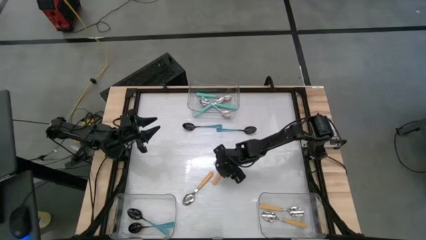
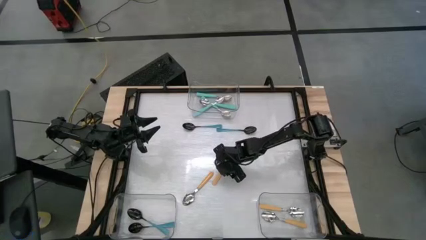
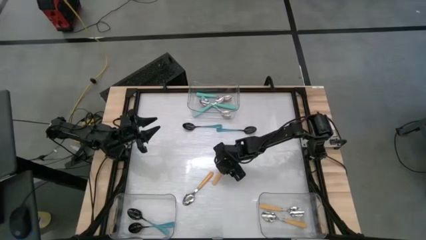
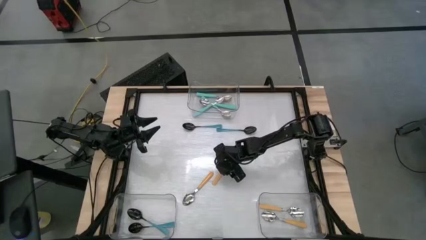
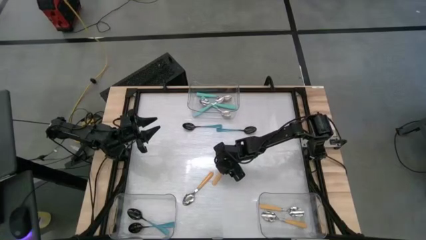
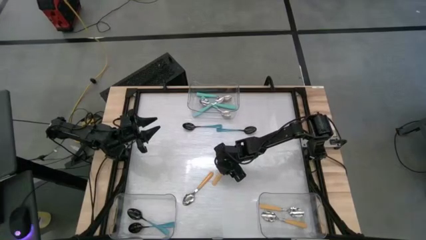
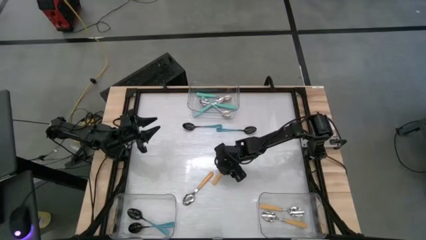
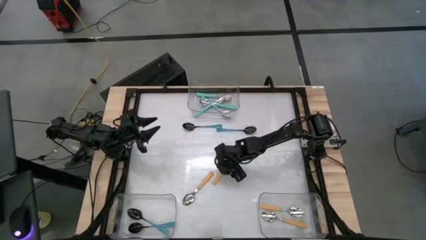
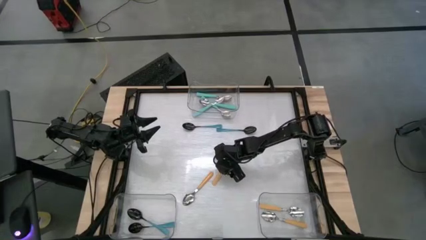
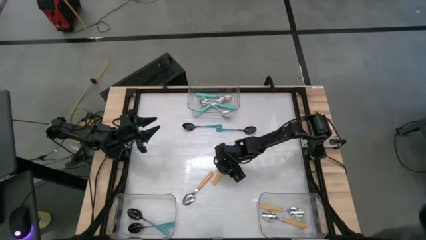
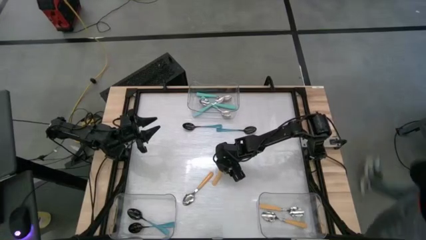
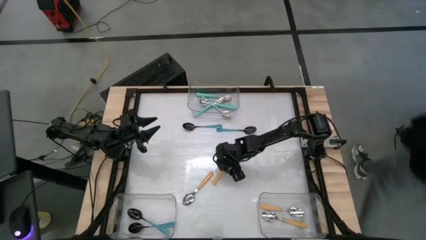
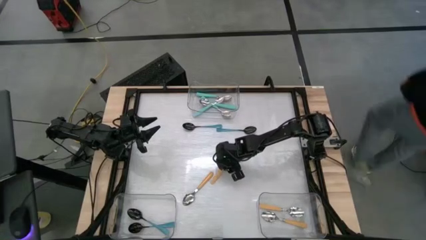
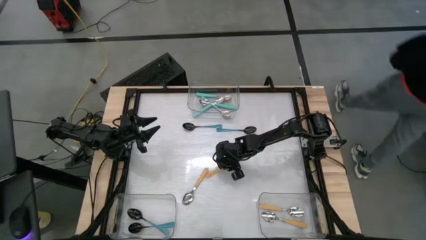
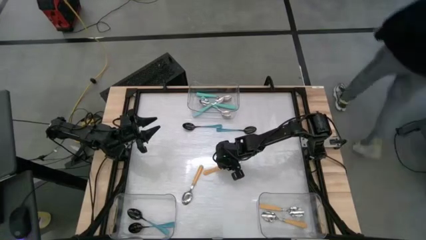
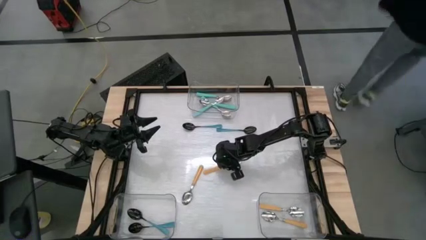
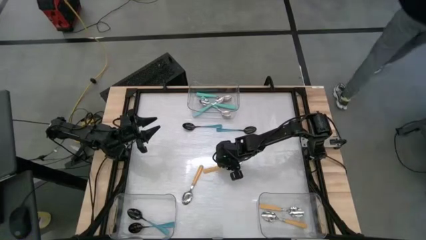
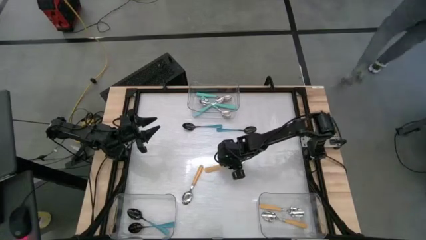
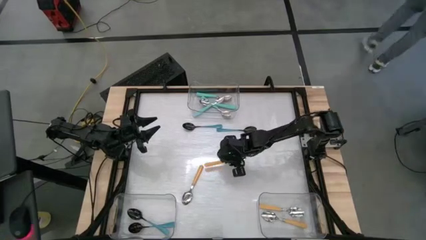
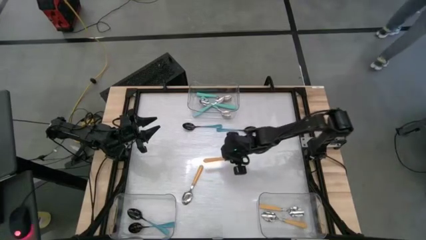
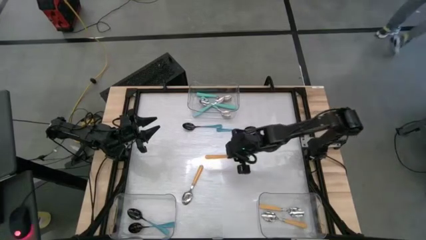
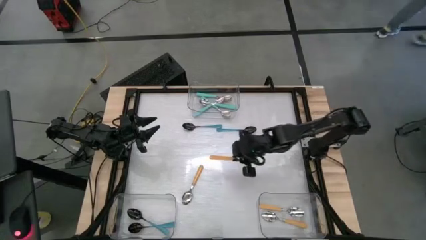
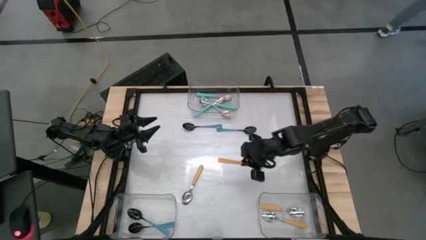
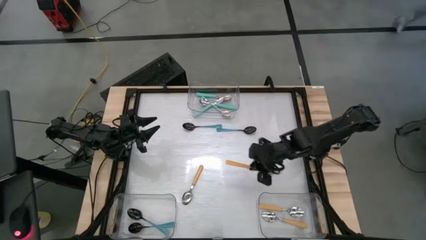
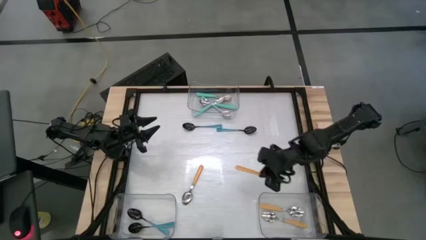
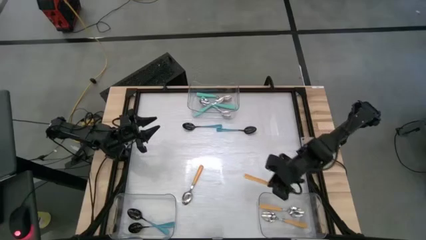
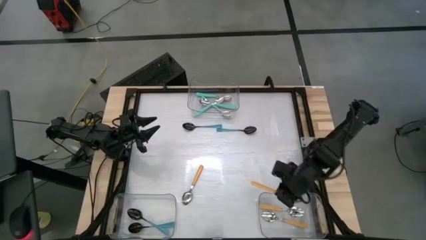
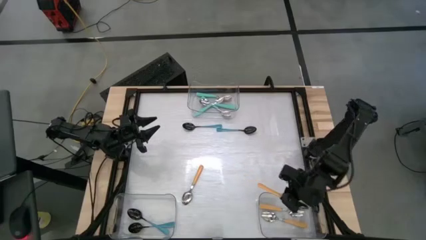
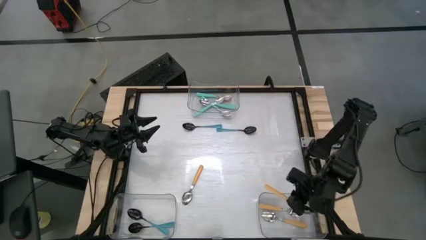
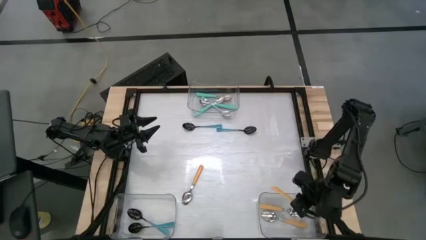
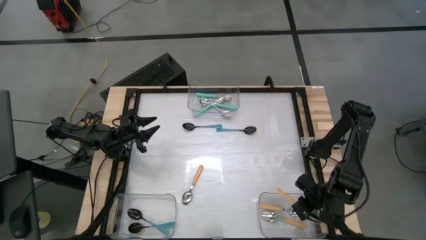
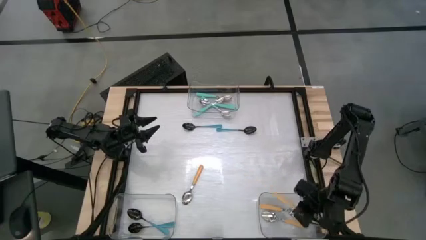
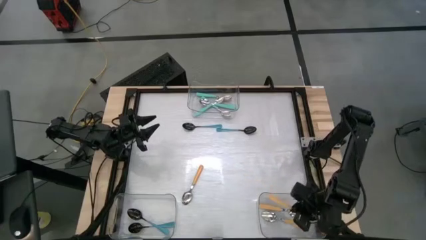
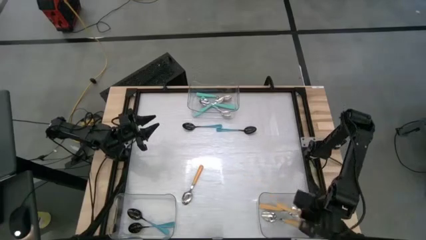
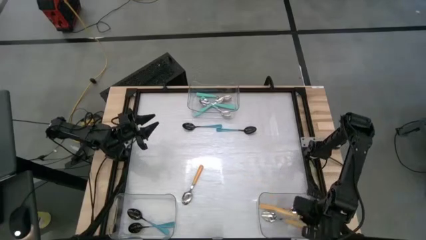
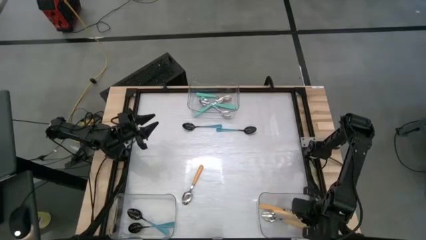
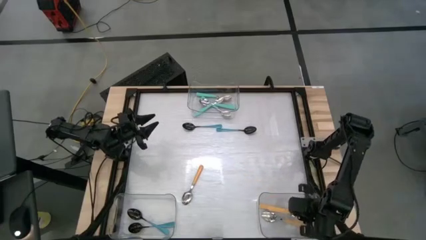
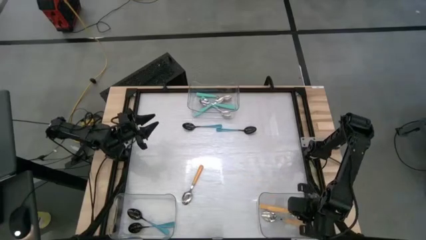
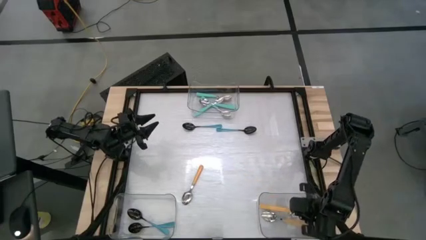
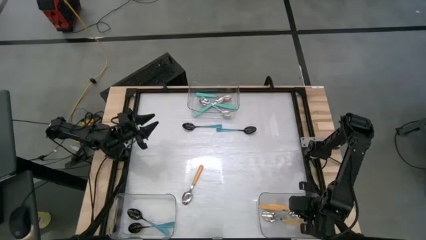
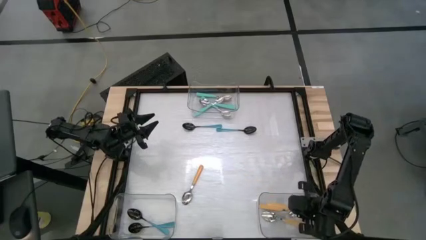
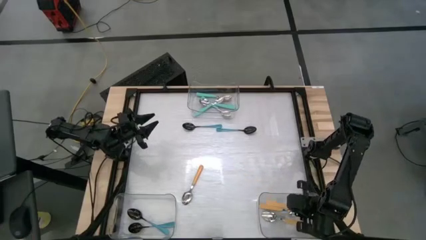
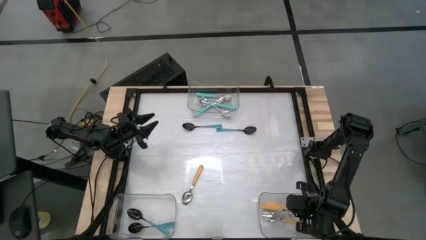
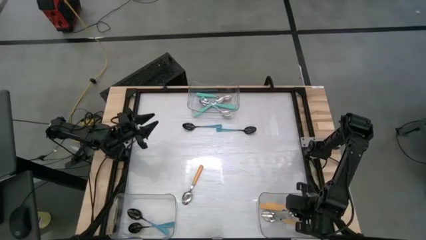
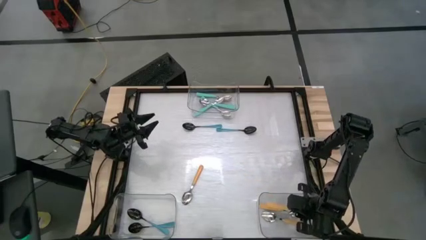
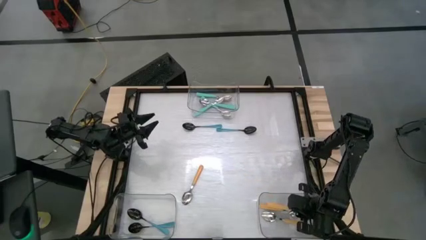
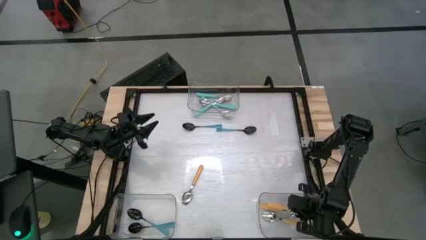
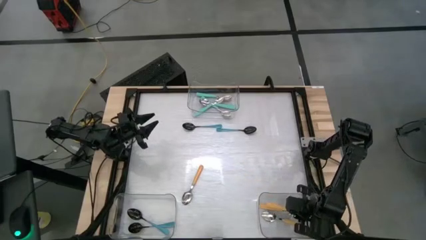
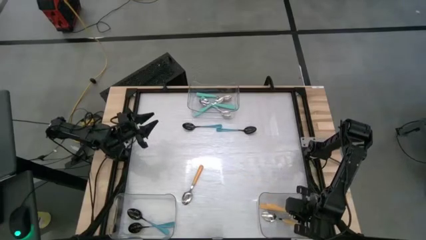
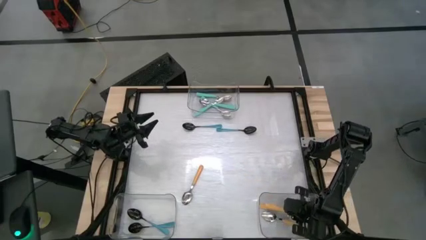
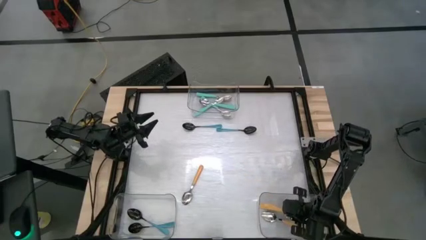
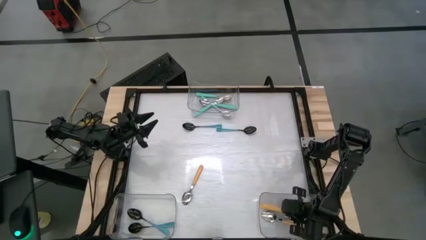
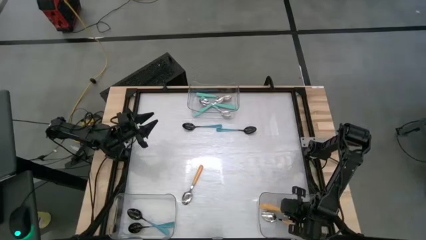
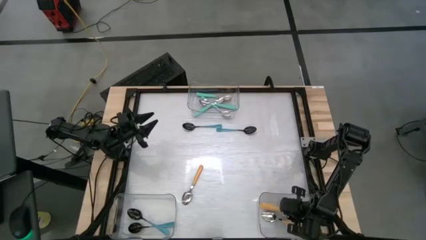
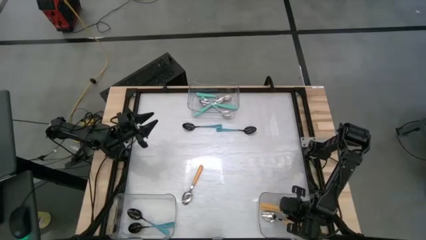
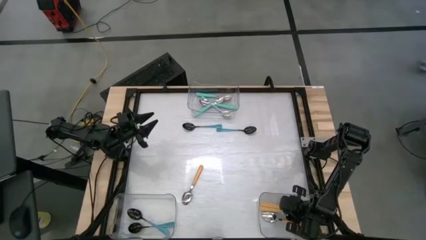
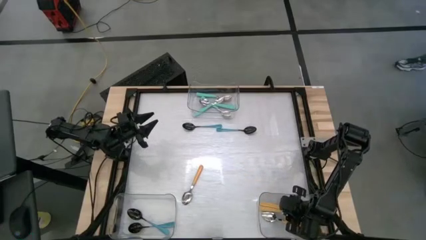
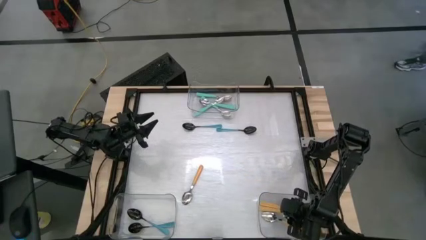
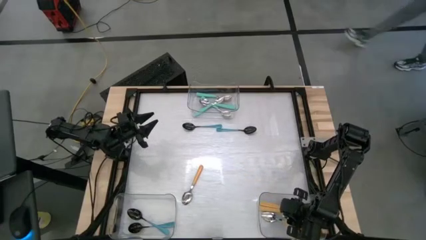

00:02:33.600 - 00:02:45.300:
Task: Sort silverware by color (type)
Put the right orange spoon into the bottom right transparent bin

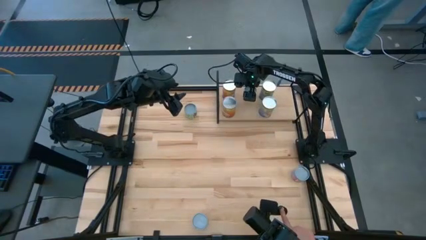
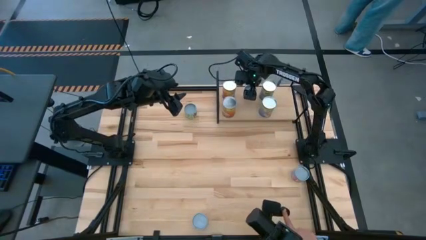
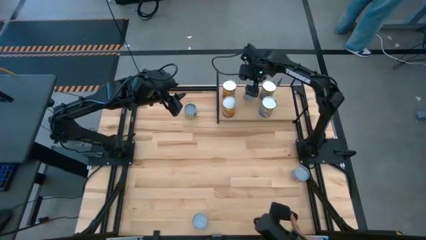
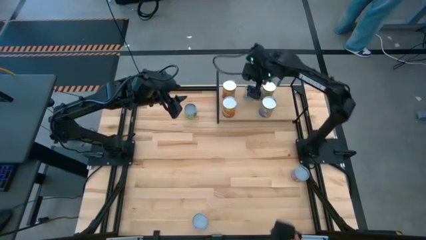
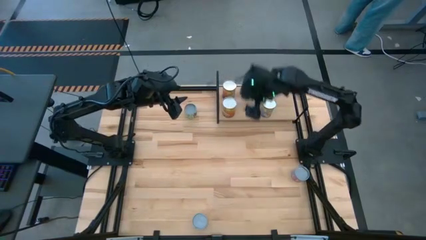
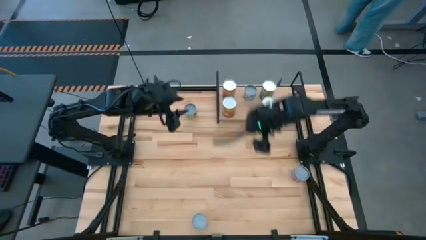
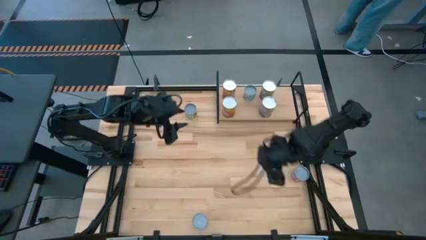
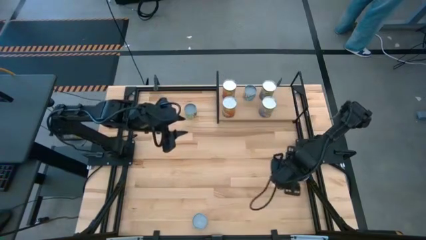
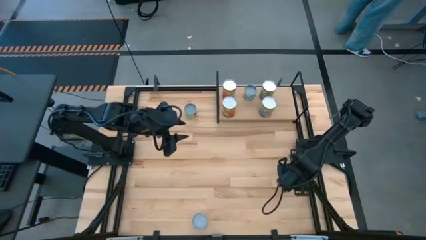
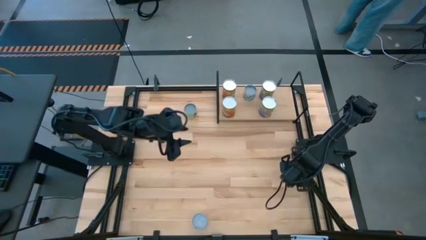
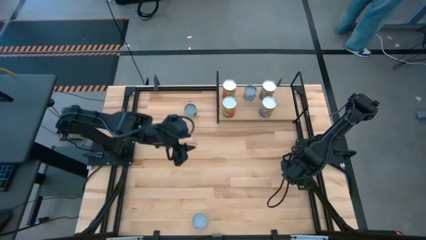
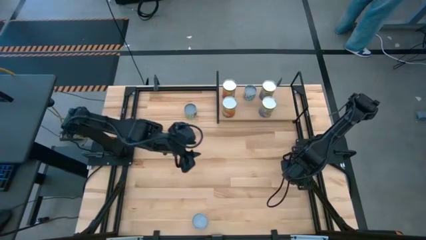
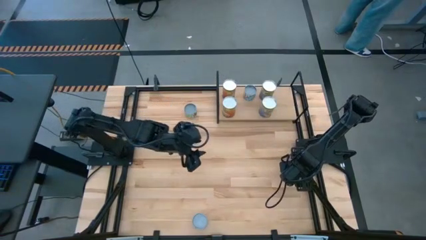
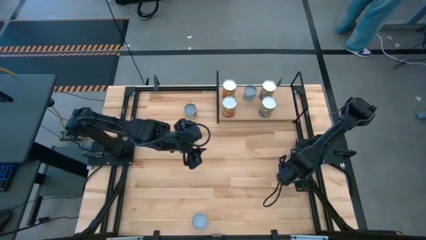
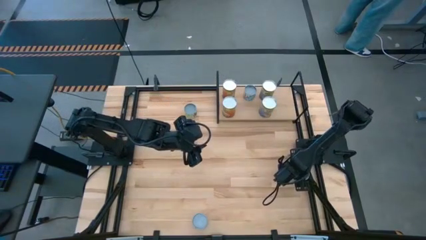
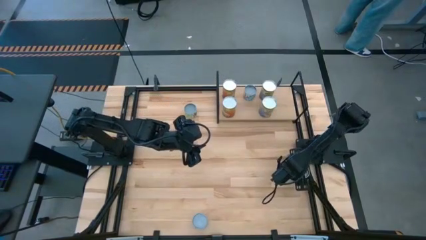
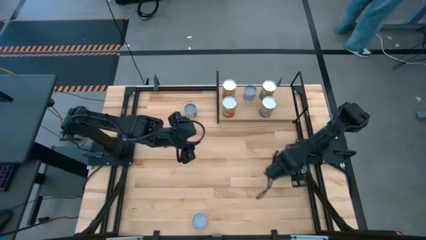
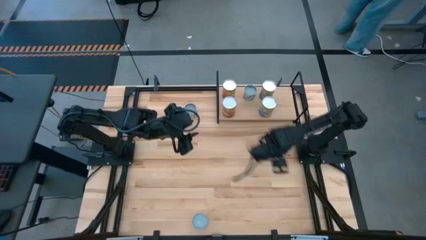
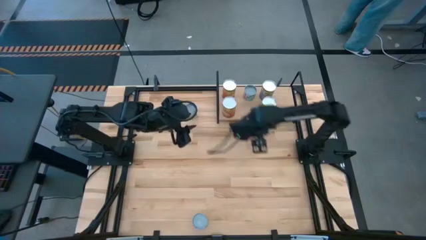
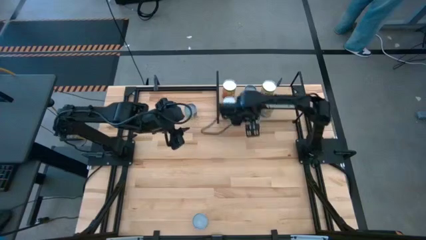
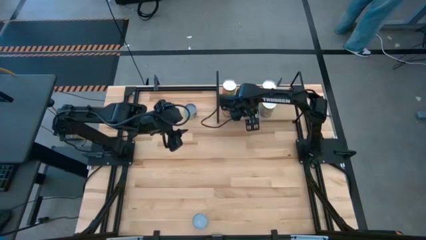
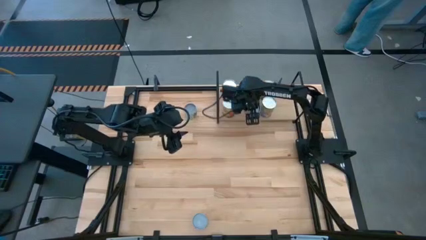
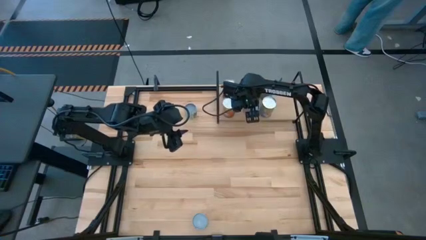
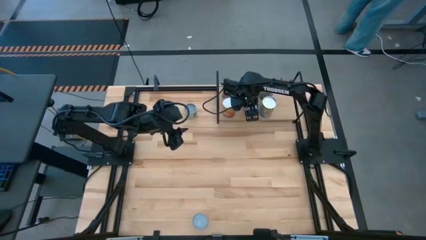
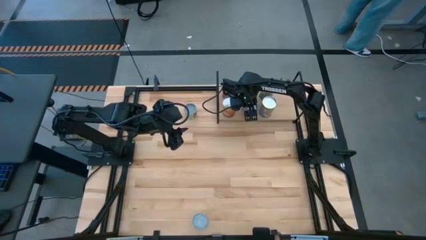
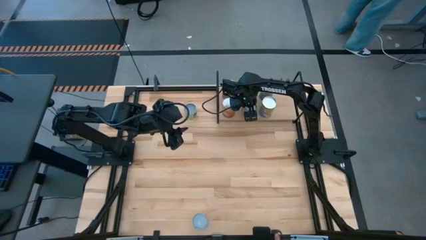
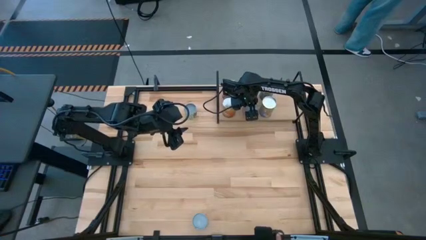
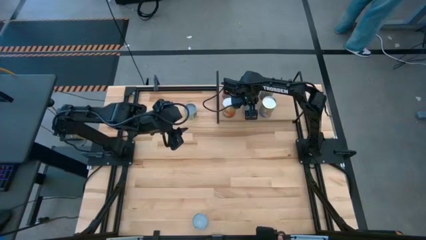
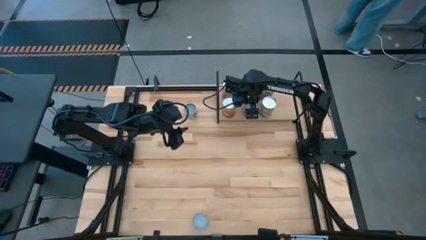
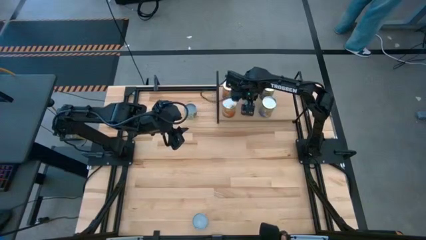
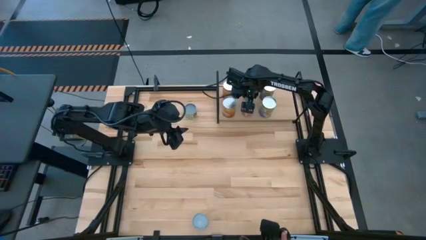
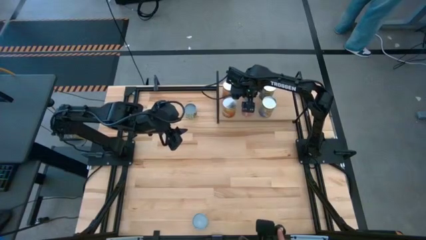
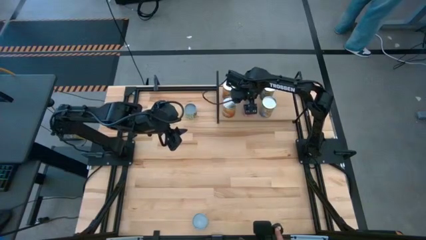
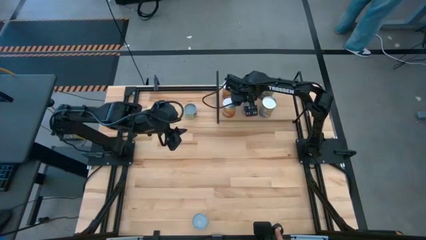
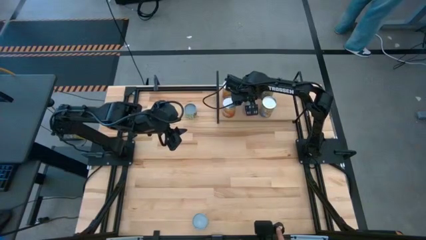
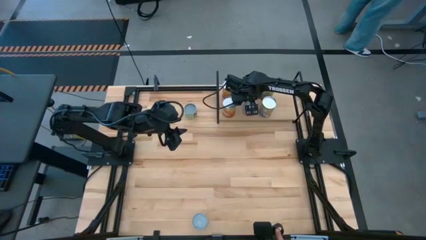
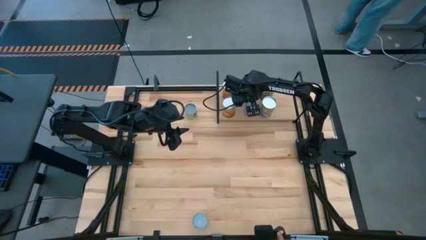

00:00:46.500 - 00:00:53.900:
Task: Pick and place cans onto a shelf
Put the small blue can on the shelf aligned with the other small white can
